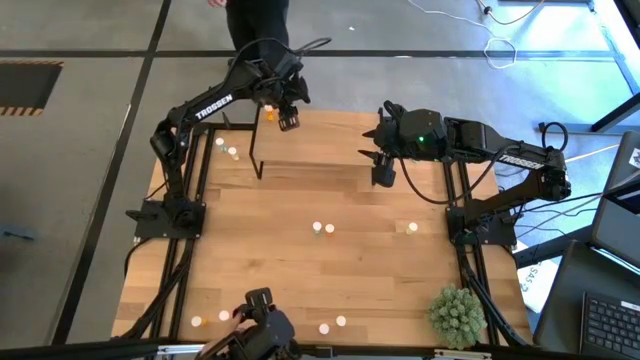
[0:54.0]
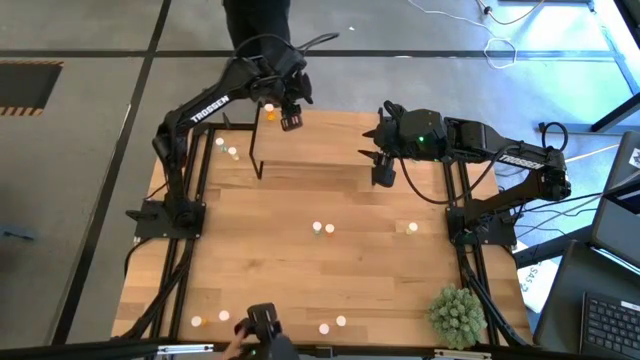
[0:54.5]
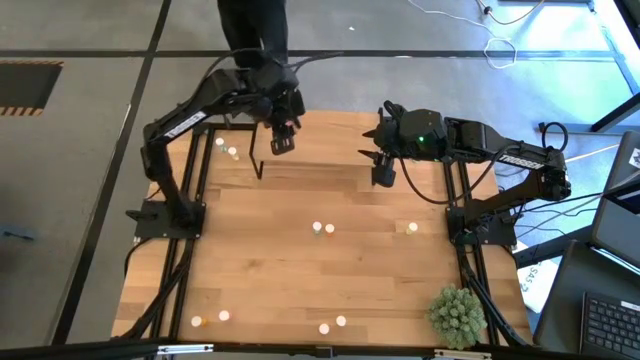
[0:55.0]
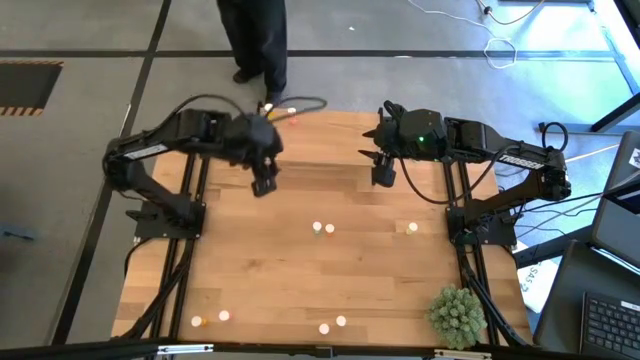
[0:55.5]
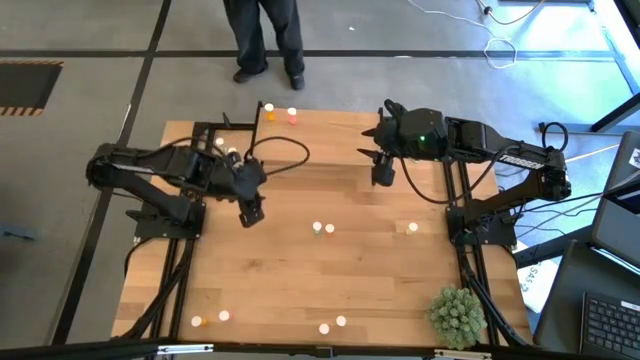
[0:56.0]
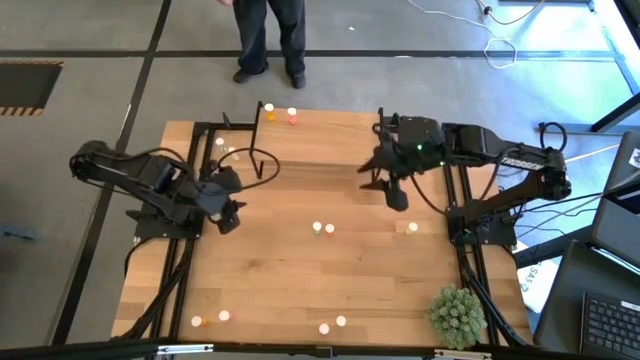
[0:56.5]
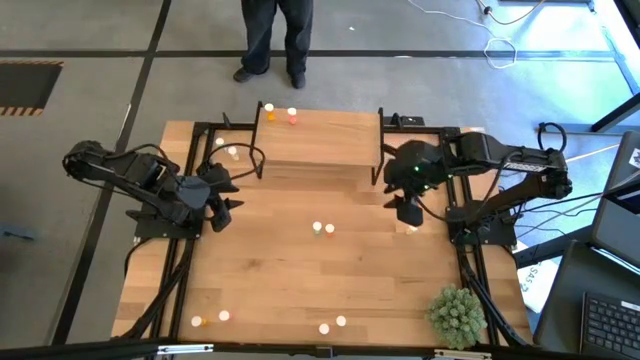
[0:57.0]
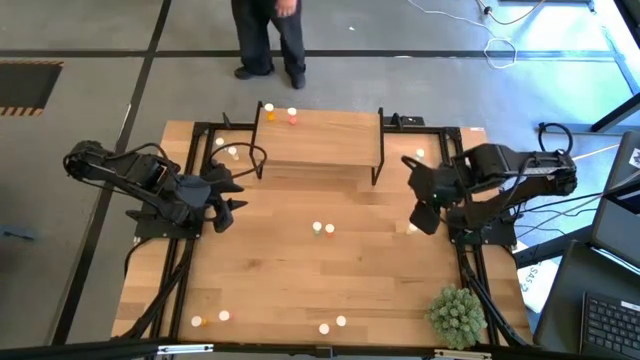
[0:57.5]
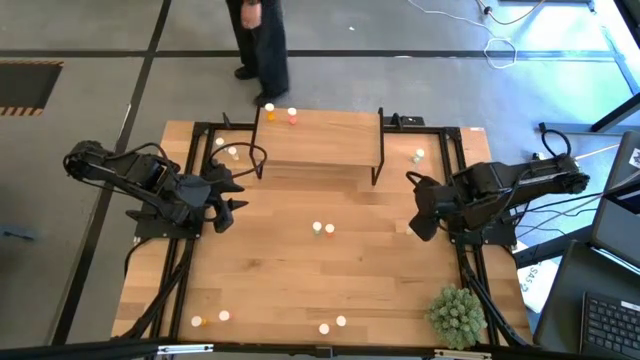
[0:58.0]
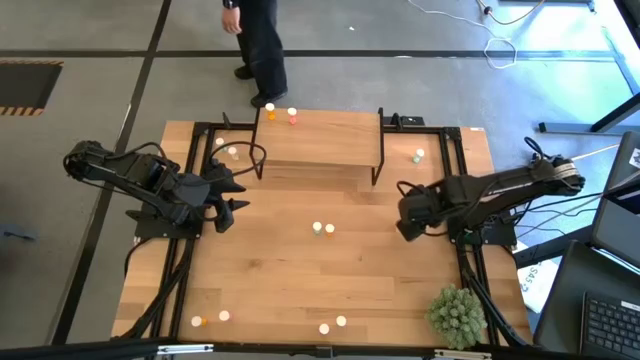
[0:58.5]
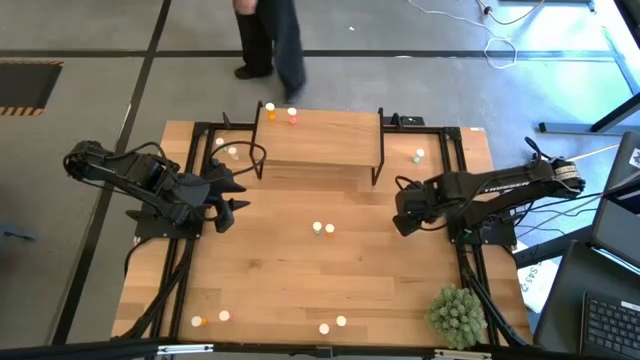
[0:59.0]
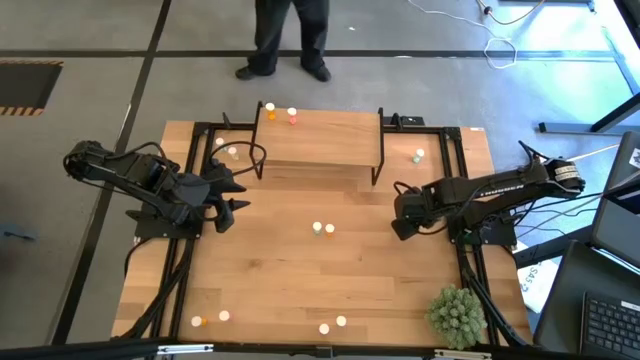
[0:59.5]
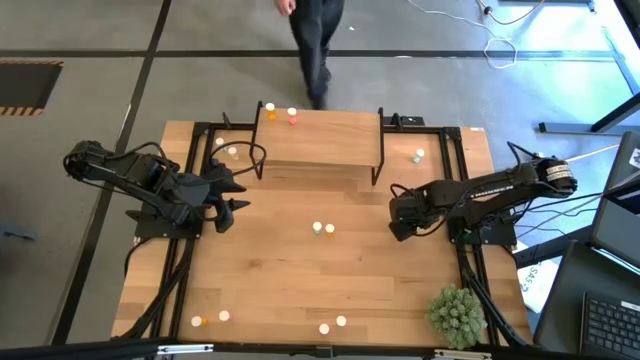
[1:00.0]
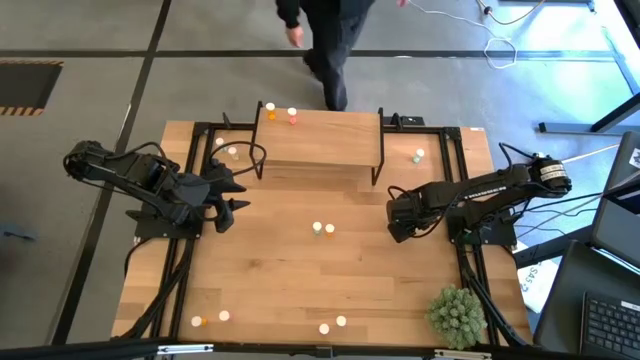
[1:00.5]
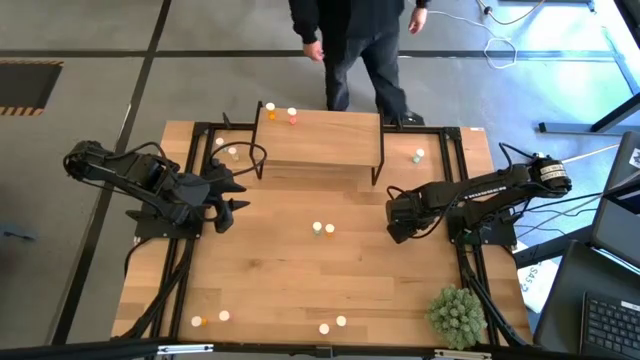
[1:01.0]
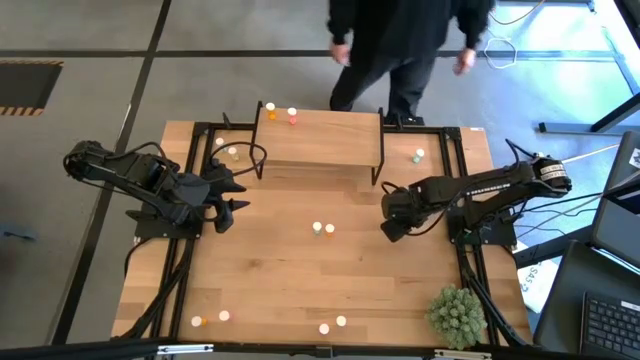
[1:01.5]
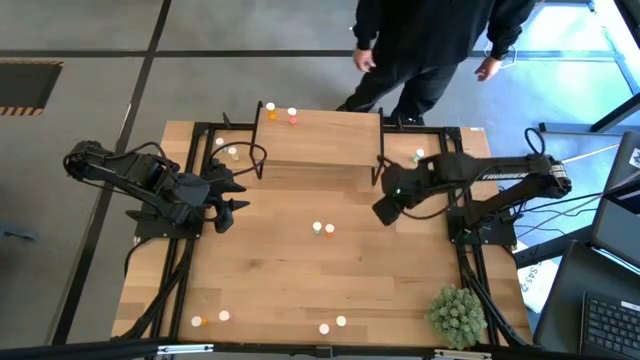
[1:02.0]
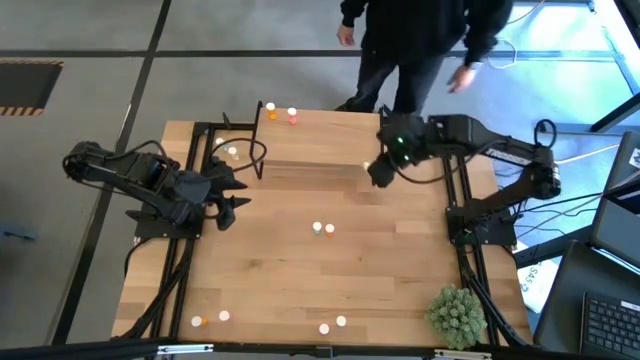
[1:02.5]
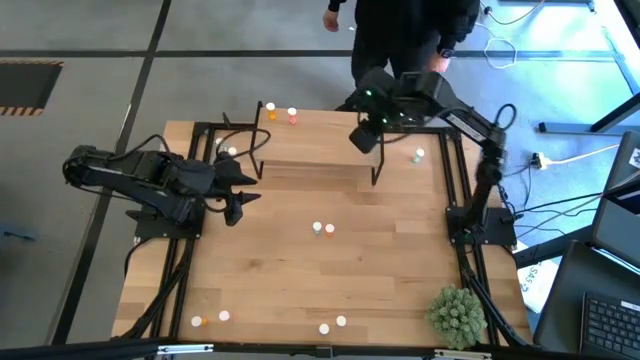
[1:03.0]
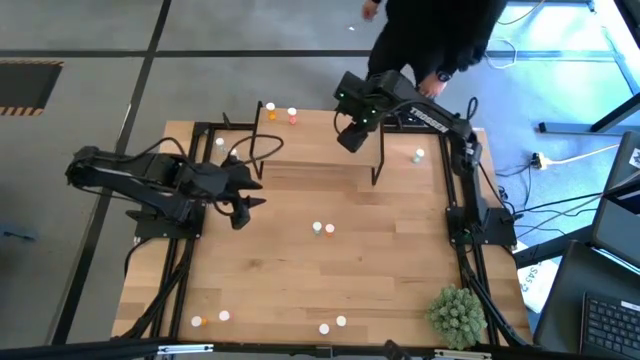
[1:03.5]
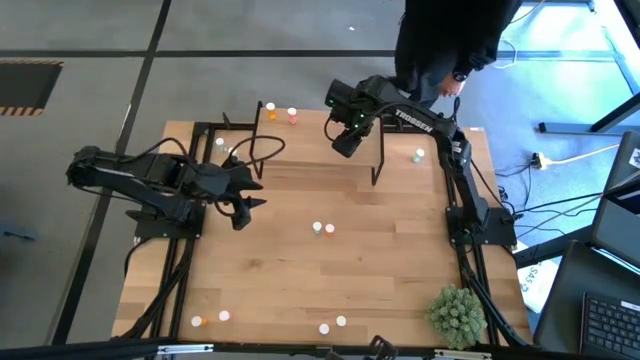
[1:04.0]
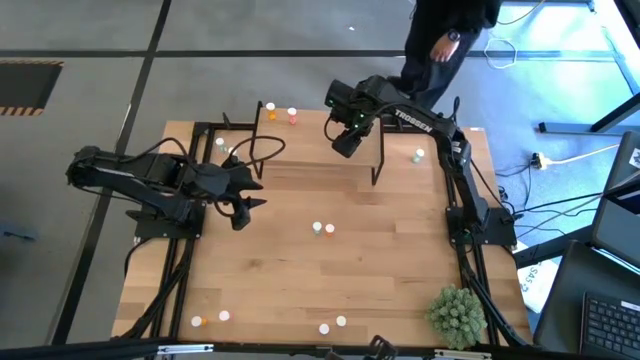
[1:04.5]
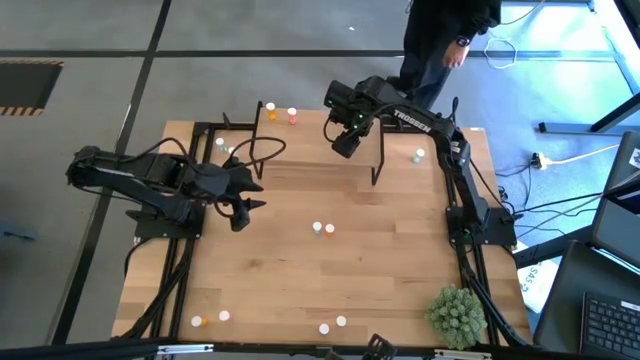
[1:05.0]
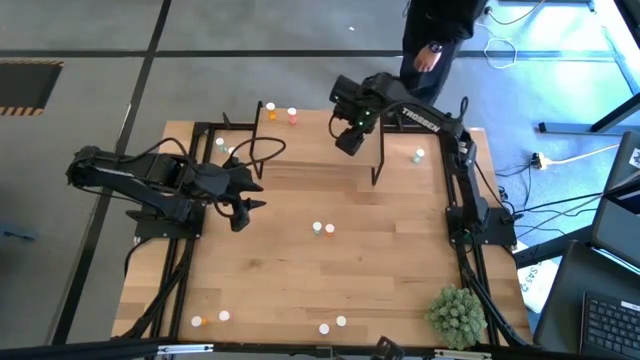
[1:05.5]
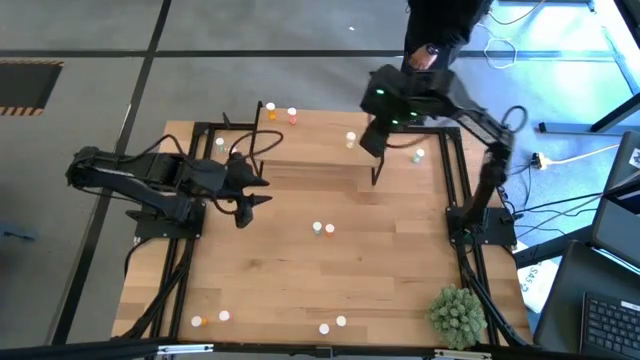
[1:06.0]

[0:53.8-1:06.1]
Task: Pick and place medicine bottles onto shelf by color
Put the middle right yellow pill bottle on the shelf

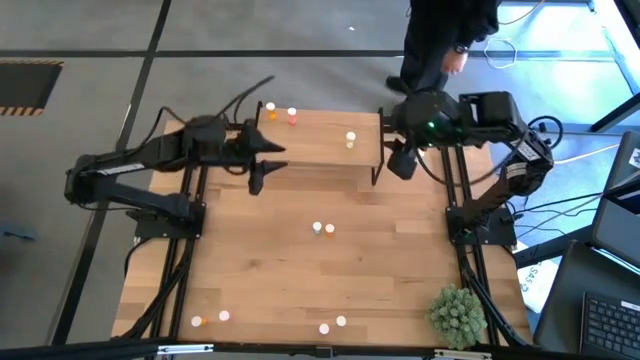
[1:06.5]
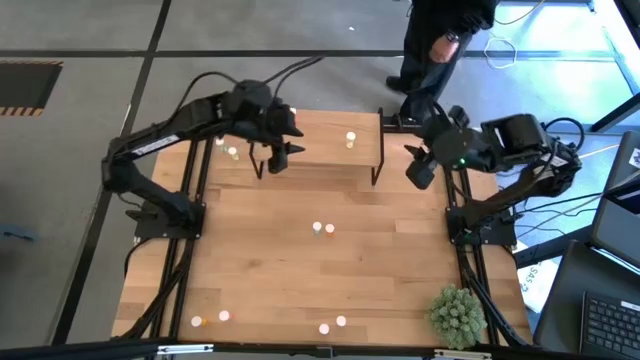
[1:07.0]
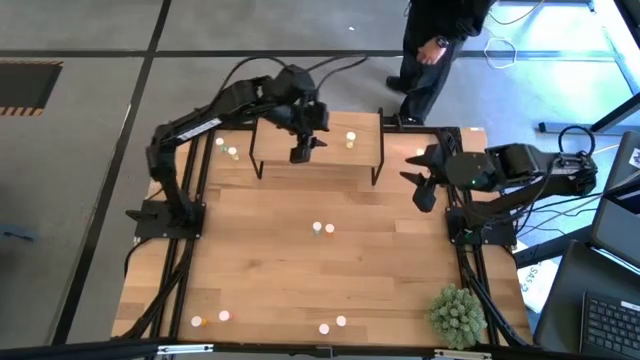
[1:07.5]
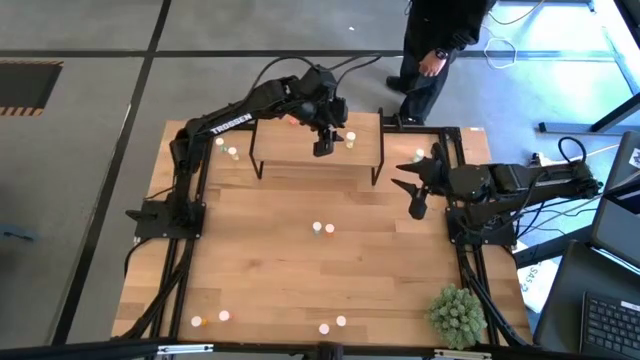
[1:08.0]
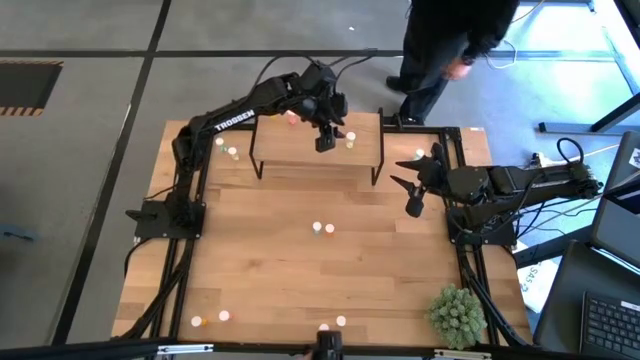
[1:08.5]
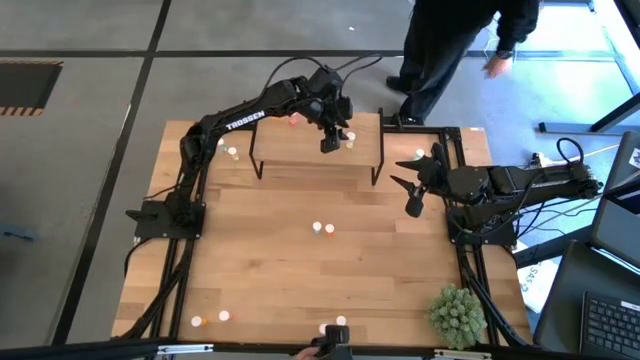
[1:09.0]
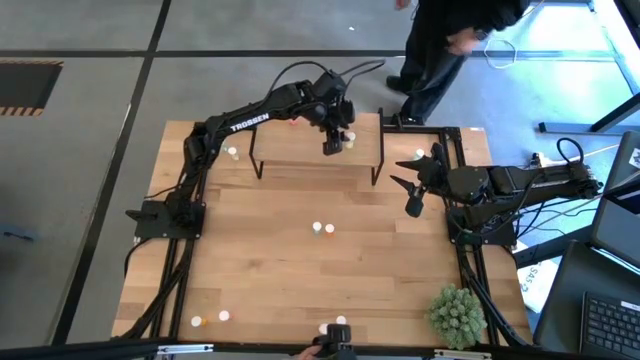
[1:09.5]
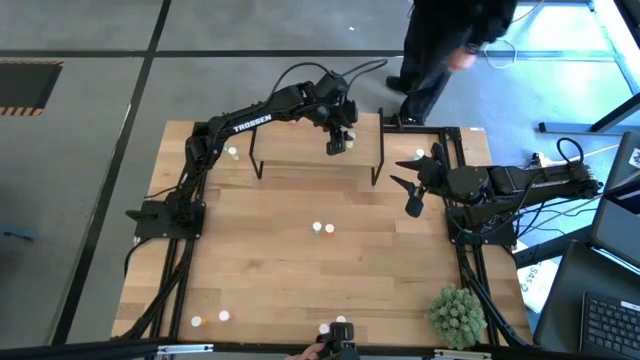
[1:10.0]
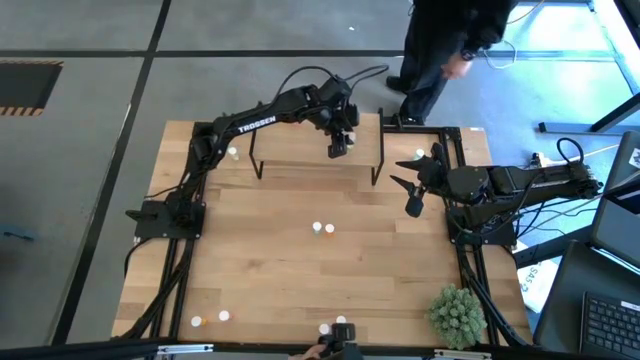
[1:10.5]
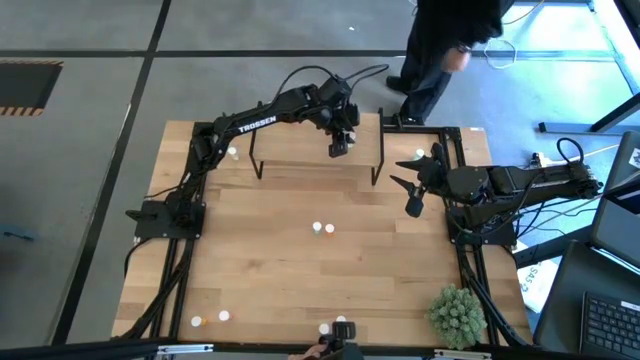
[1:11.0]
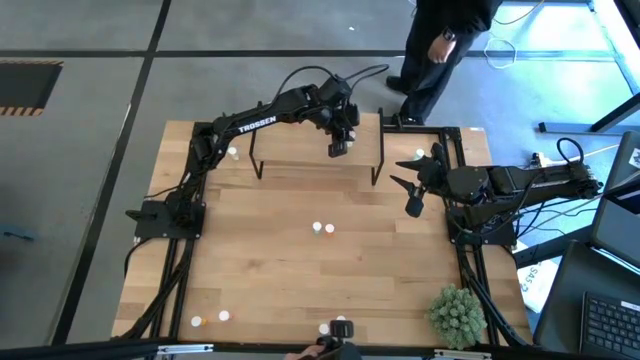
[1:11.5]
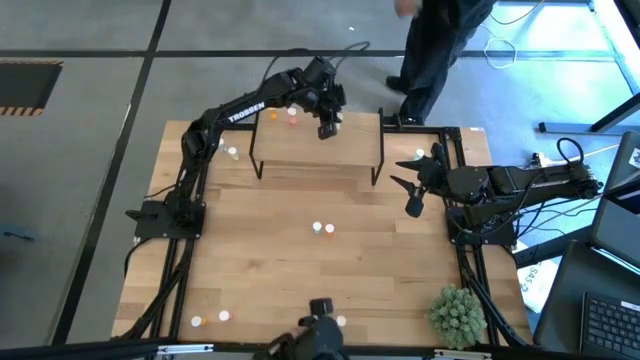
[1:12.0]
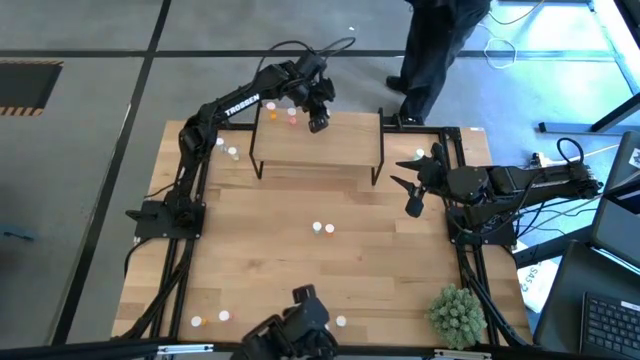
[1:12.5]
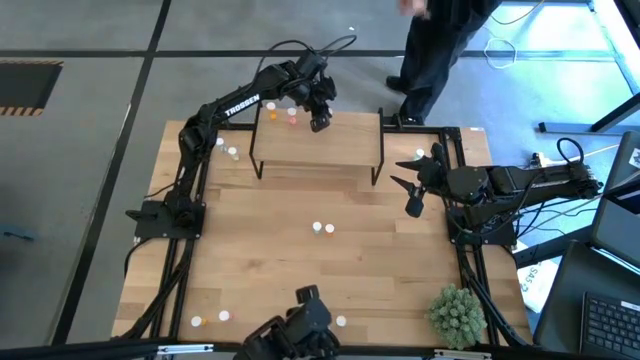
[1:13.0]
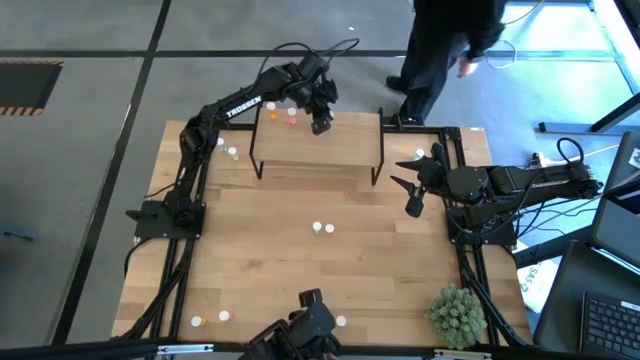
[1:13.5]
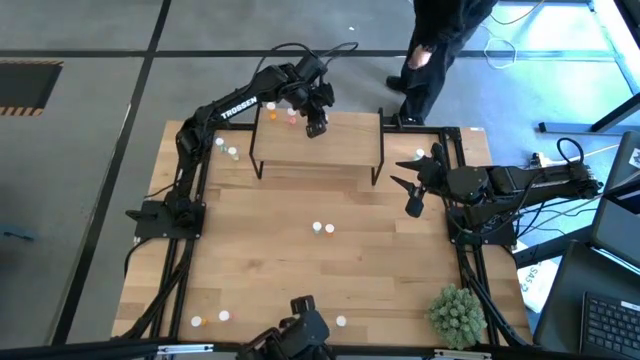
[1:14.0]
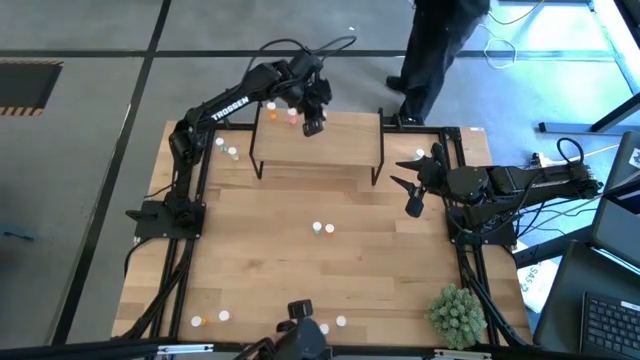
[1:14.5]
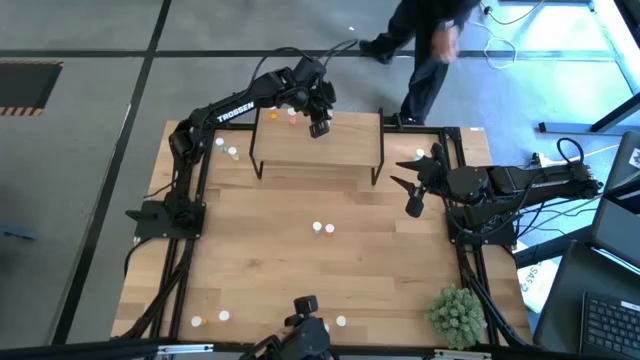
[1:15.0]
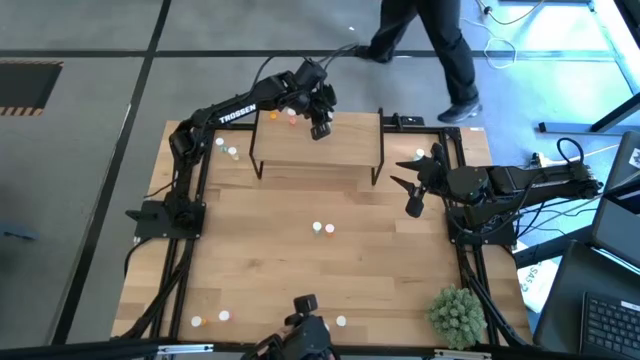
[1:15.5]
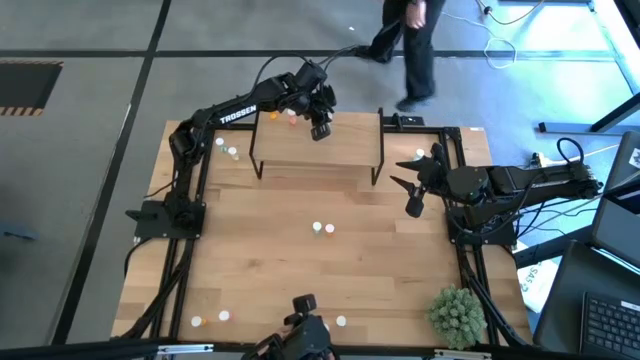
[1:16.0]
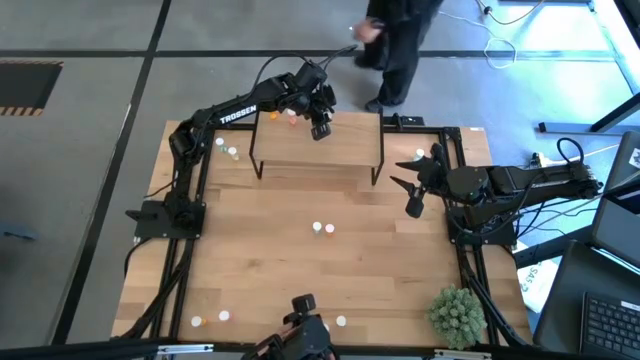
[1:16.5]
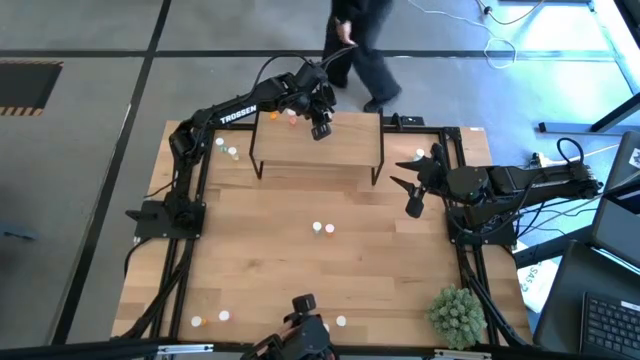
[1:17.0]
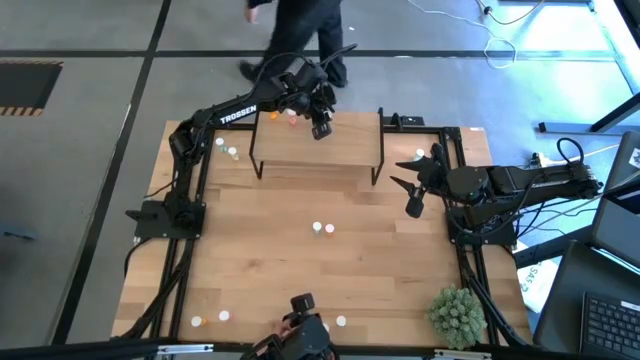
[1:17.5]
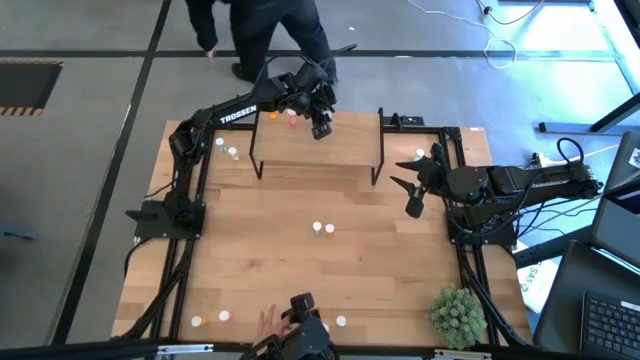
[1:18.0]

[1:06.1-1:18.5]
Put the middle right yellow pill bottle on the shelf
